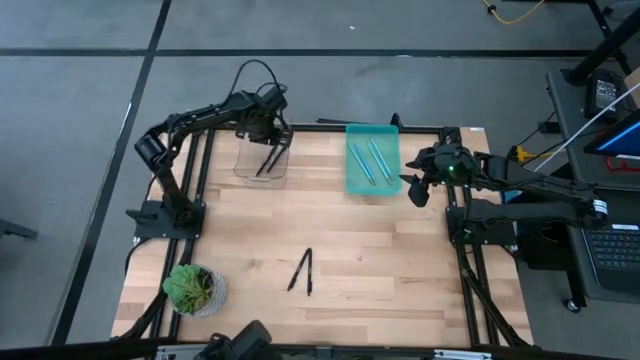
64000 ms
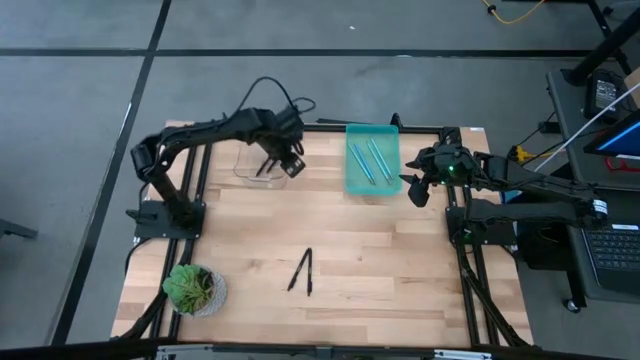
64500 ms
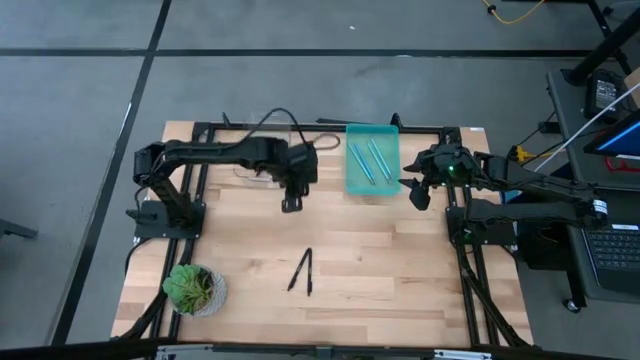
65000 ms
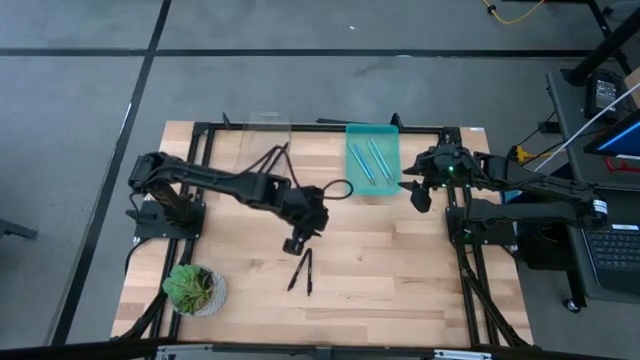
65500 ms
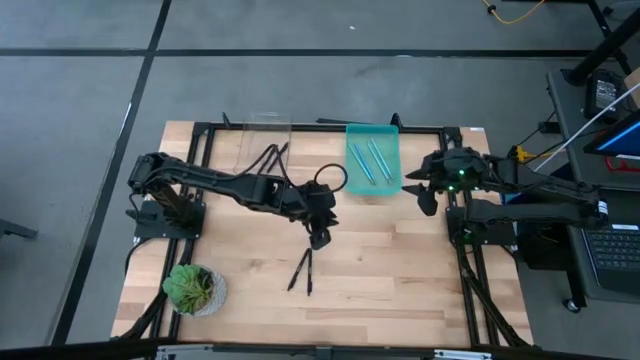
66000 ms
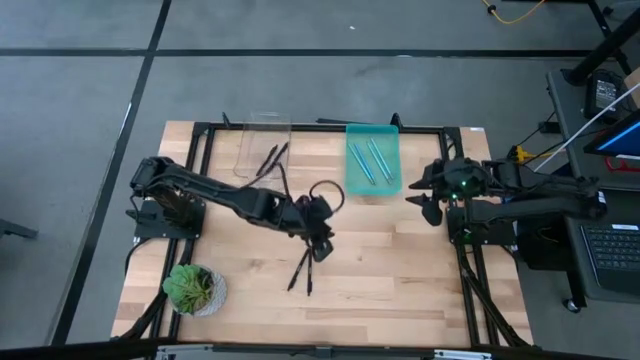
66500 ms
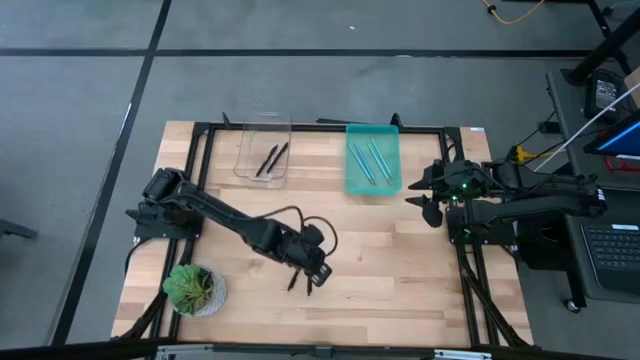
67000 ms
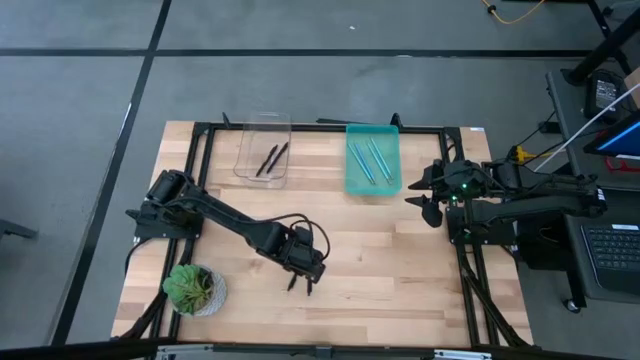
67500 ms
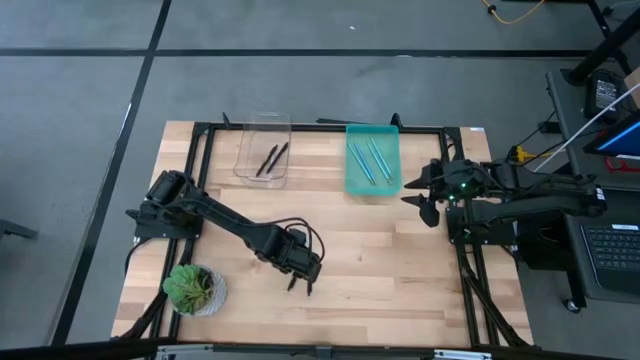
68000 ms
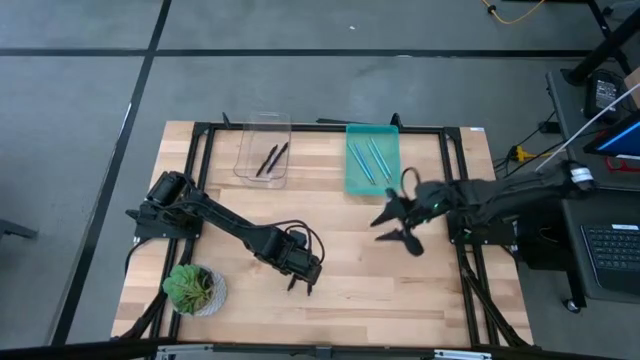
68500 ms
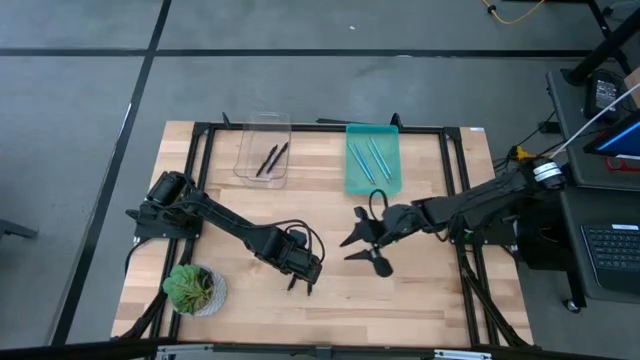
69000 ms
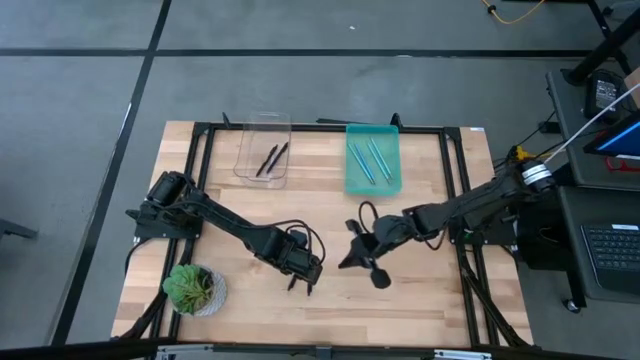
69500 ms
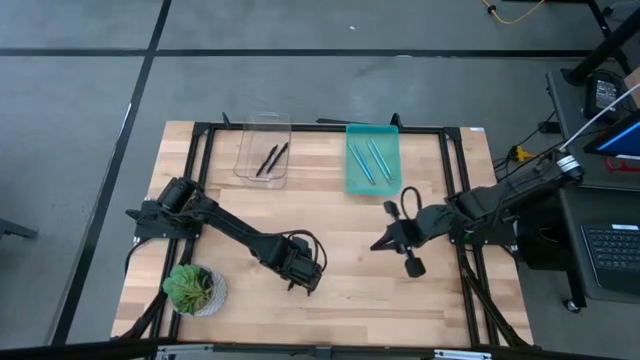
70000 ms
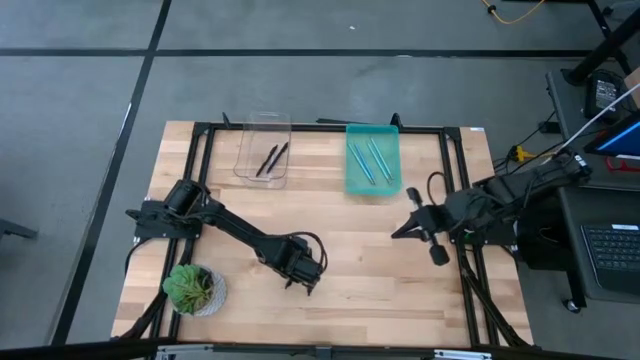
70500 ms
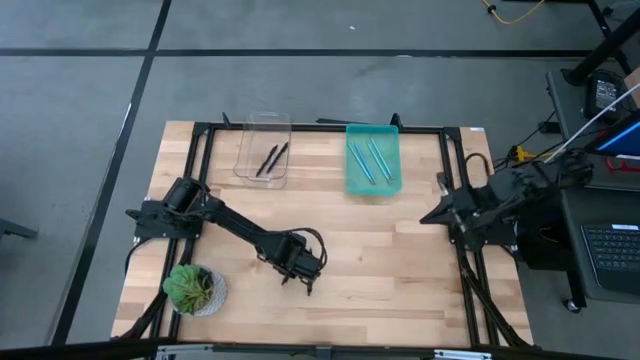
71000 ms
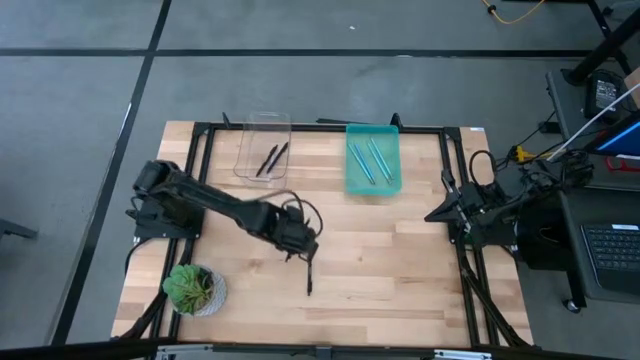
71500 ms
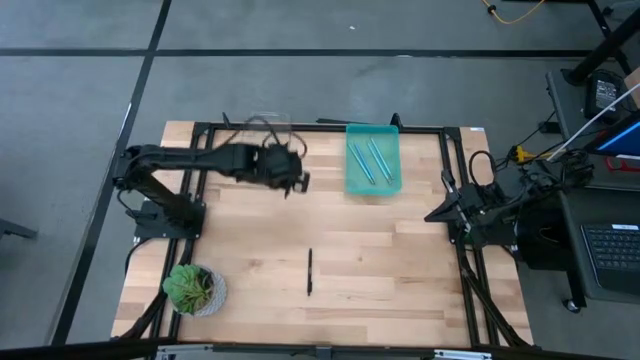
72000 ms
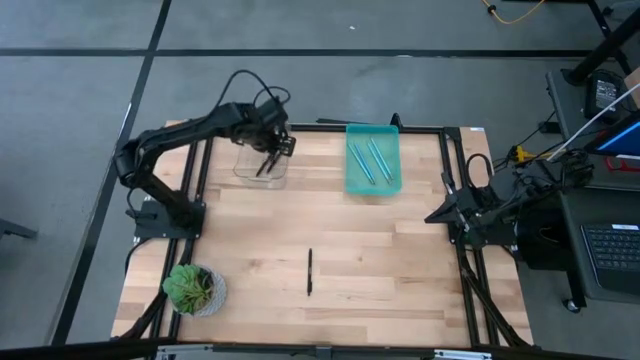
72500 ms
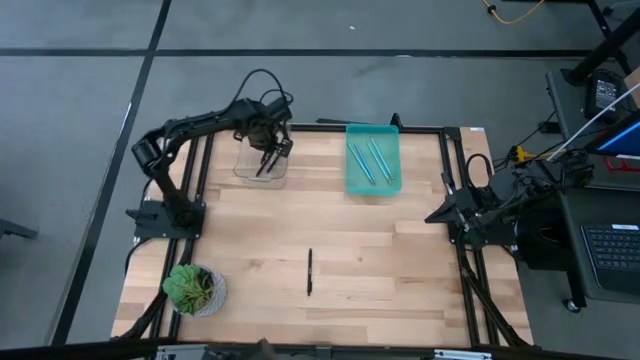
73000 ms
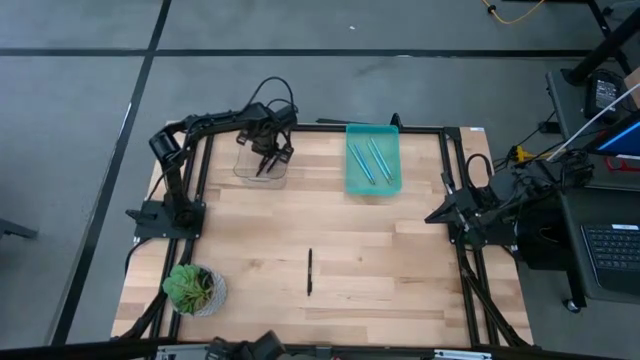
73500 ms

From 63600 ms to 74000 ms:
Task: Sort pens & pencils
Put the black pen into the transparent bin

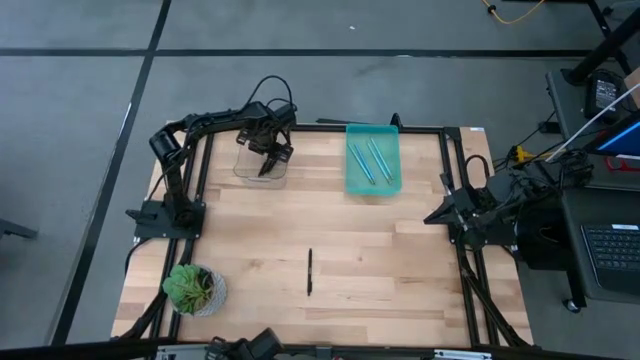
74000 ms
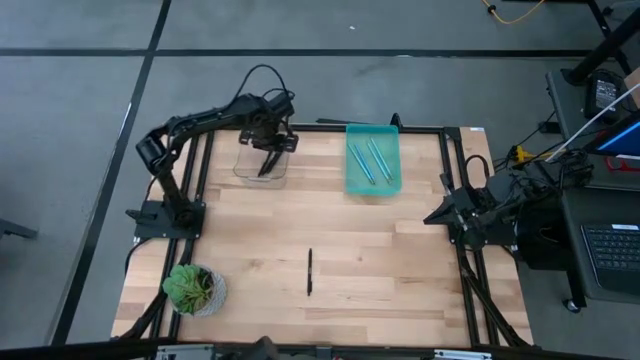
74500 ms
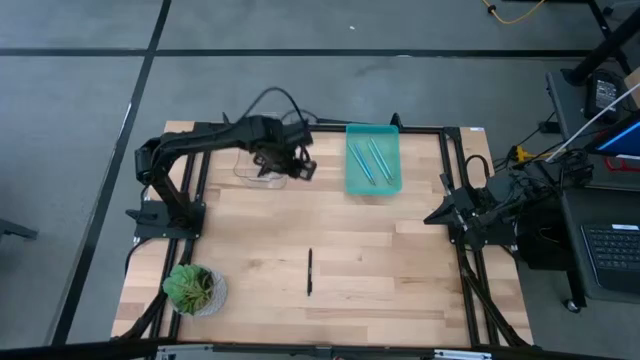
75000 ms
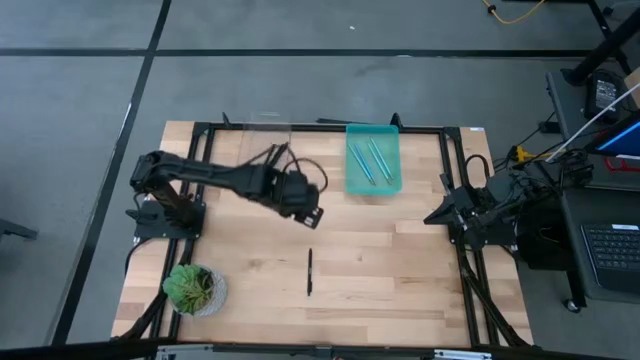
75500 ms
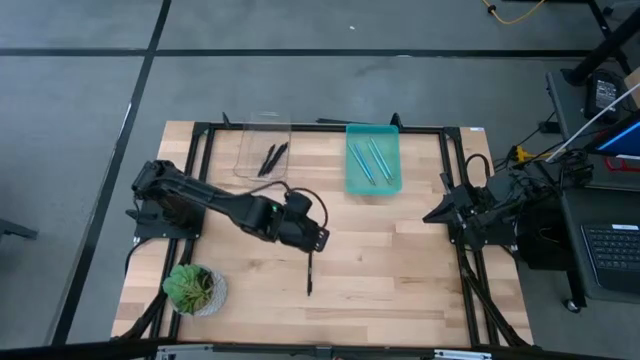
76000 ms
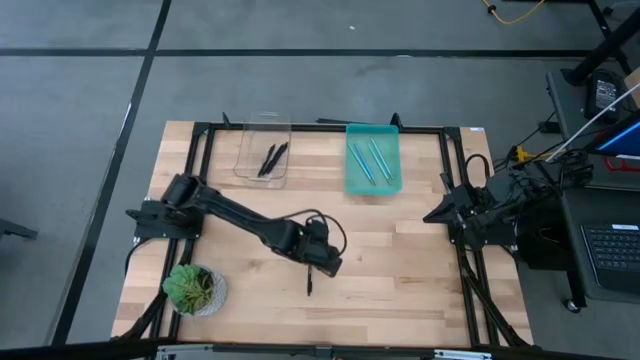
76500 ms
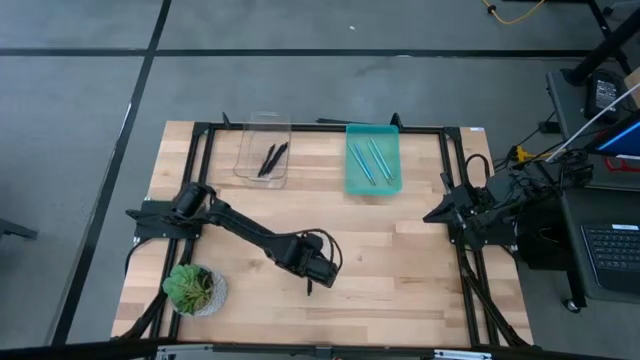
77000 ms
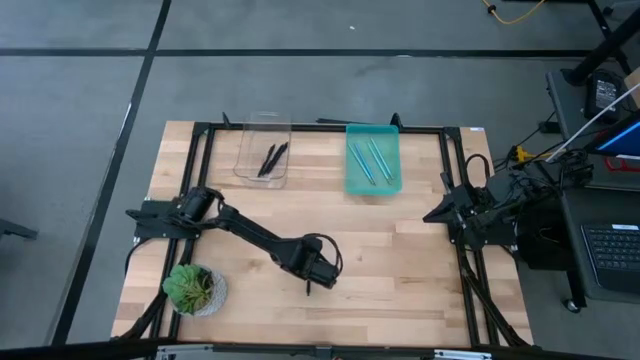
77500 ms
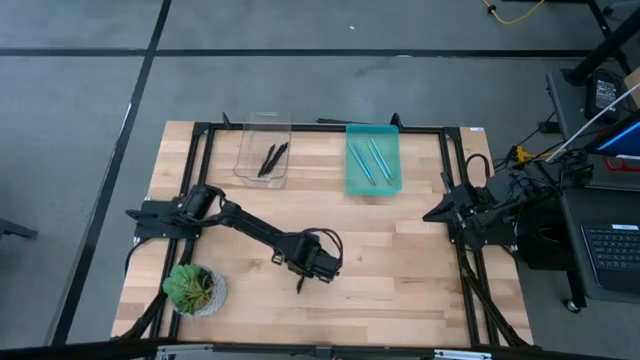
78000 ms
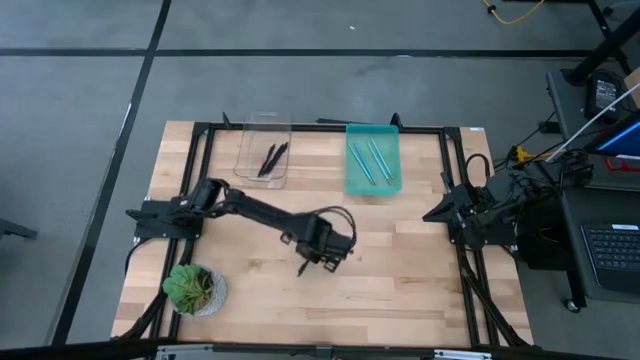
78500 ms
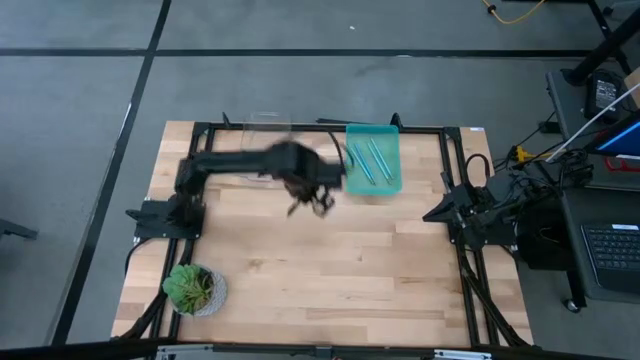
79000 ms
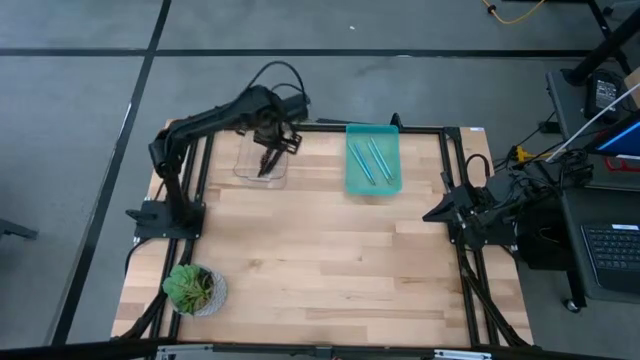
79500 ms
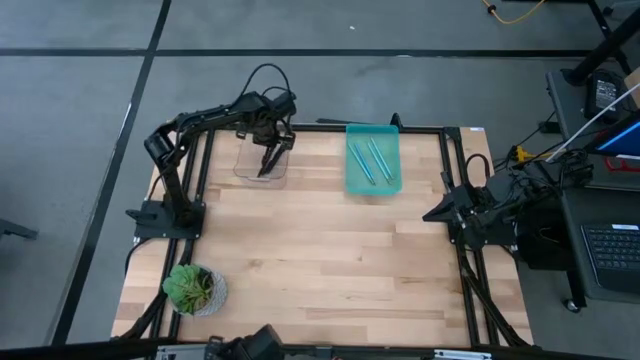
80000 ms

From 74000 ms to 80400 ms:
Put the black pen into the transparent bin

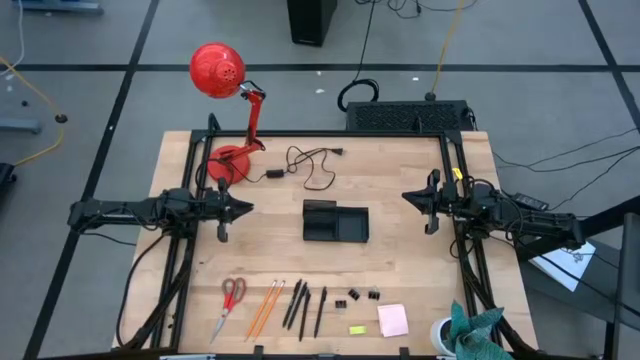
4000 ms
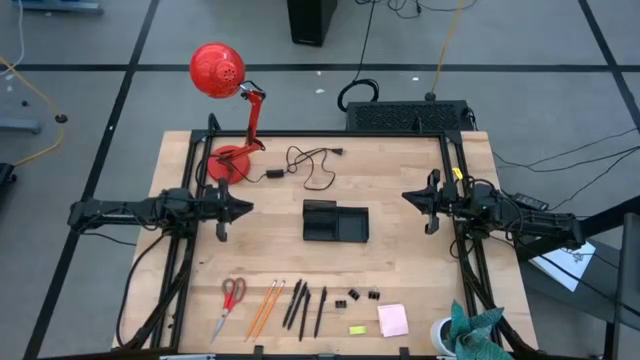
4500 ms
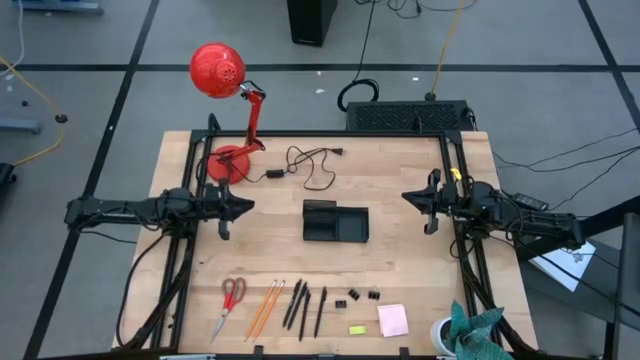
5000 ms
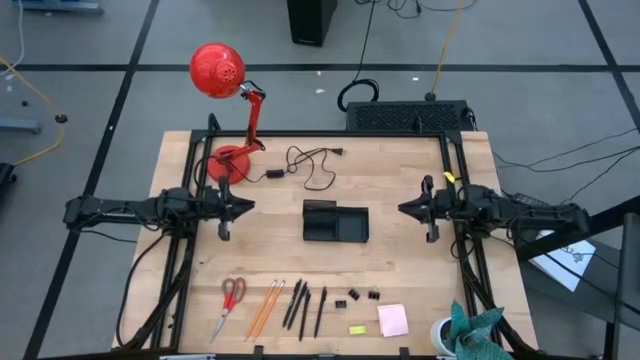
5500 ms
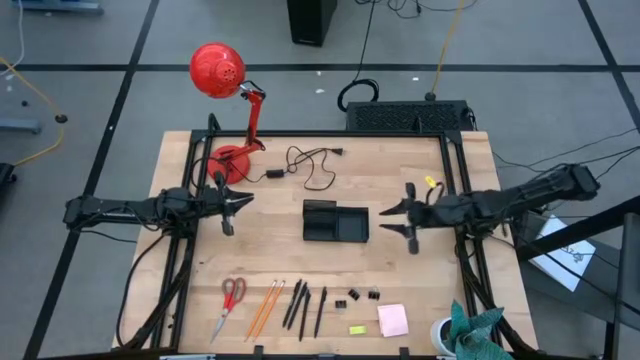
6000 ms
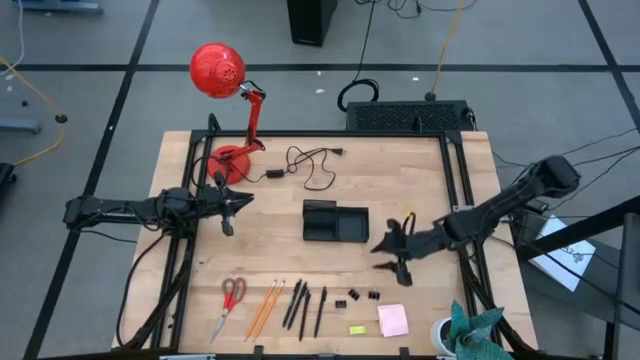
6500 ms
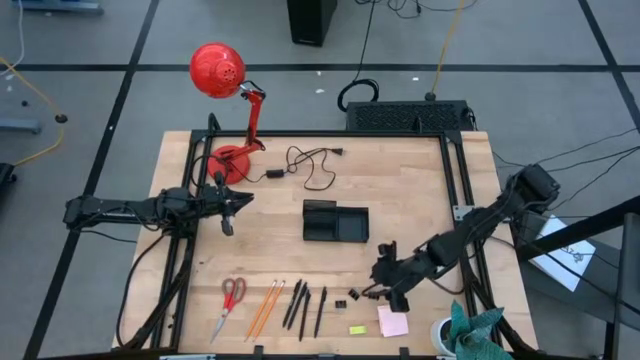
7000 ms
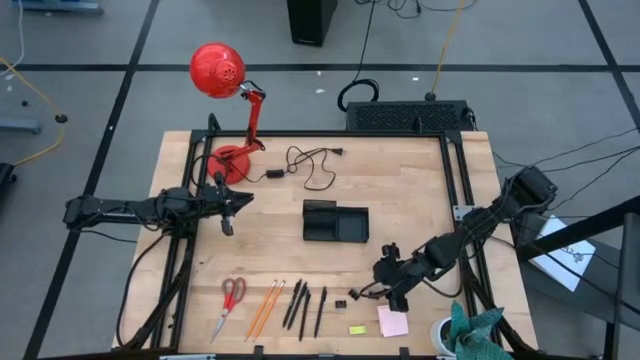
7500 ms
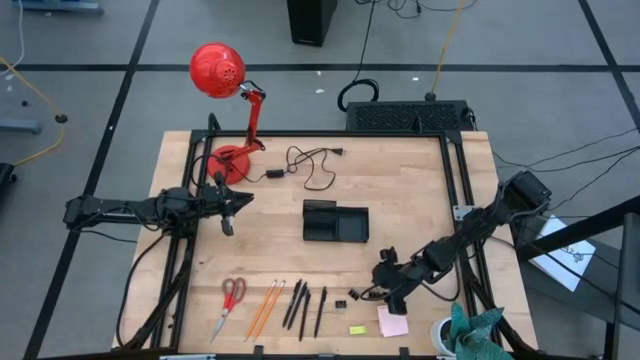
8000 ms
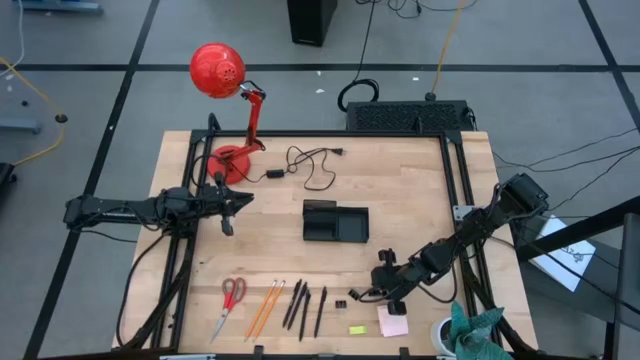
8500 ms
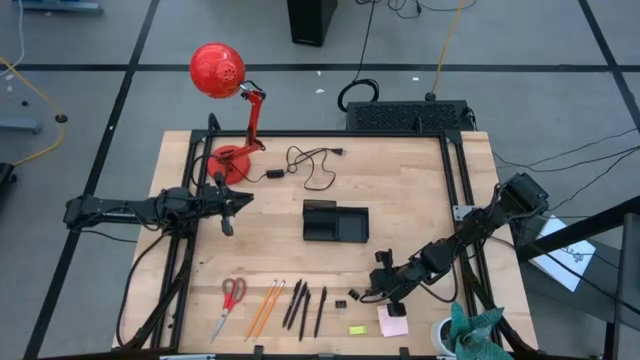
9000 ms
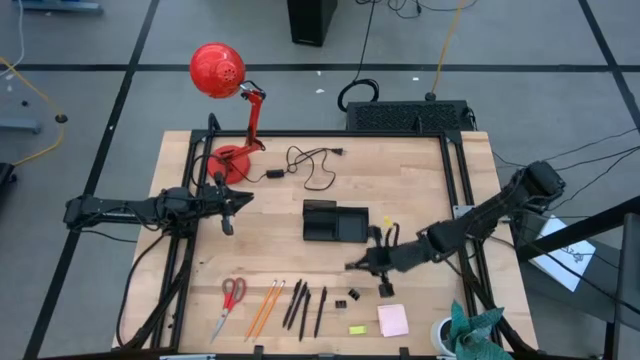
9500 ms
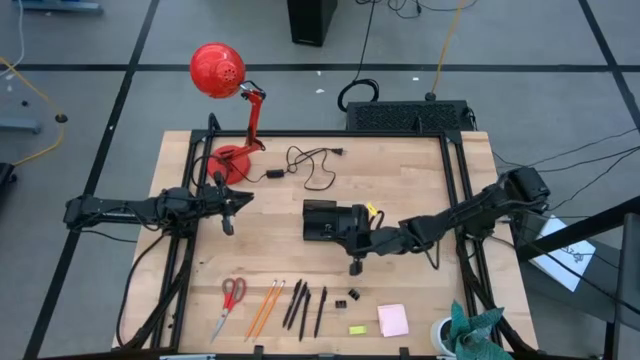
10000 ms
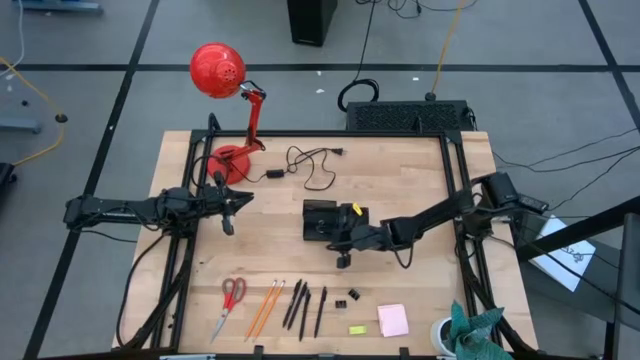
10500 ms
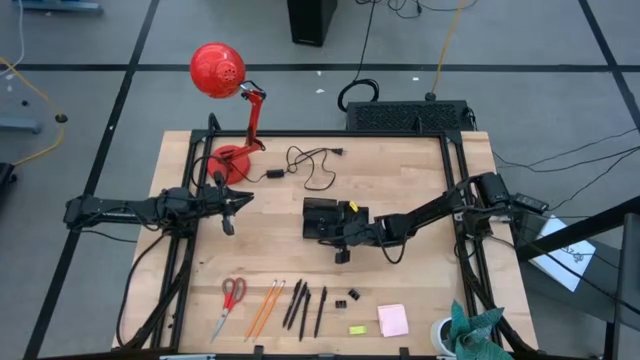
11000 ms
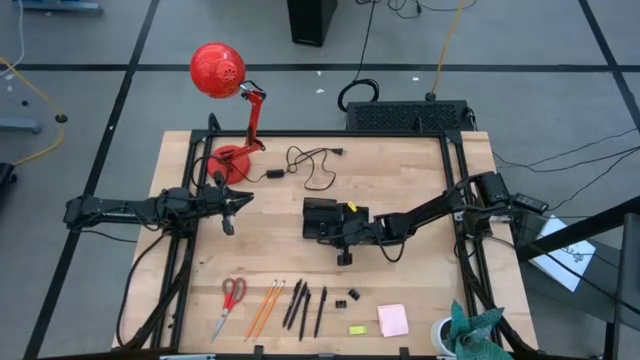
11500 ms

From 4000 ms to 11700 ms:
Task: Pick and place office supplies into organizer
Put the right black binder clip into the black desk organizer
